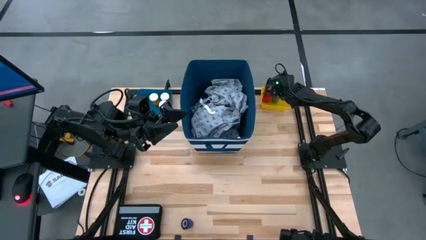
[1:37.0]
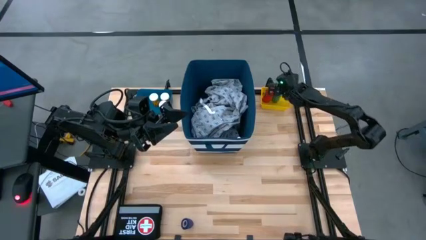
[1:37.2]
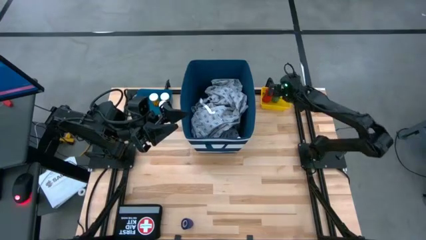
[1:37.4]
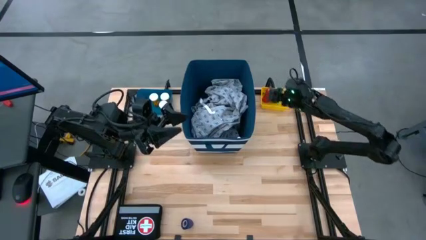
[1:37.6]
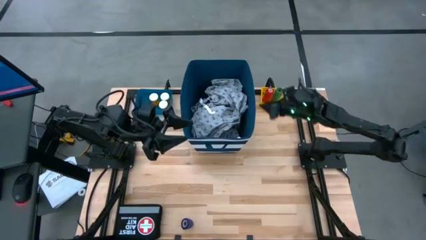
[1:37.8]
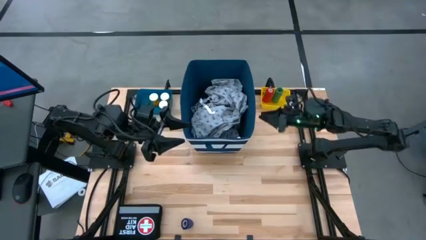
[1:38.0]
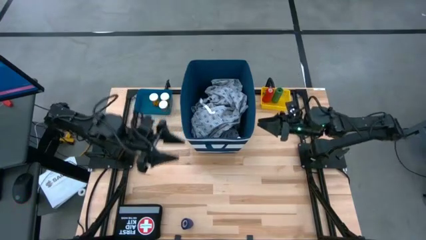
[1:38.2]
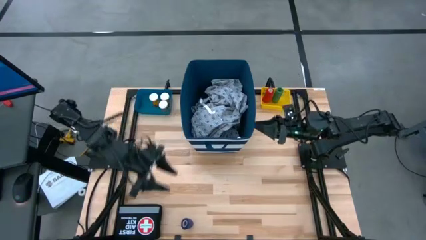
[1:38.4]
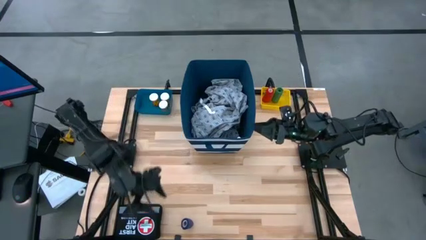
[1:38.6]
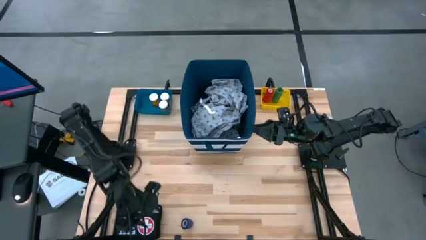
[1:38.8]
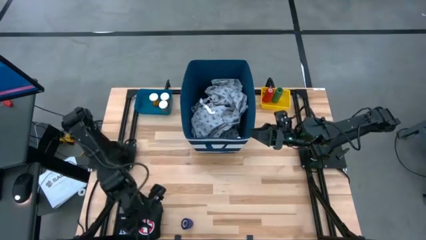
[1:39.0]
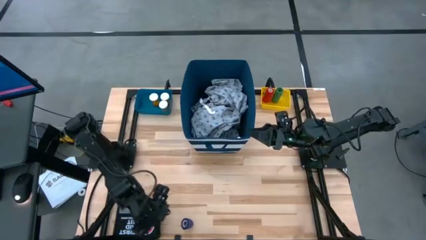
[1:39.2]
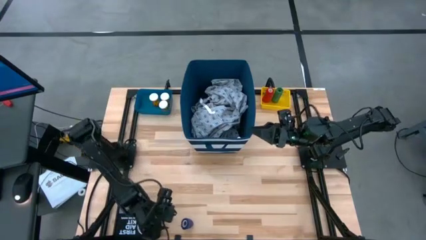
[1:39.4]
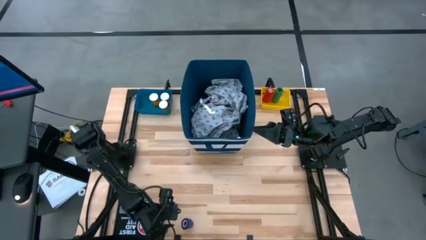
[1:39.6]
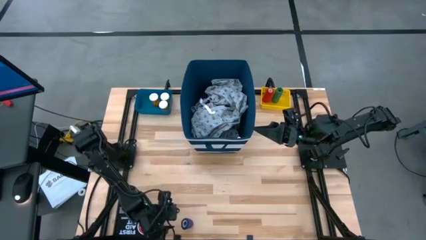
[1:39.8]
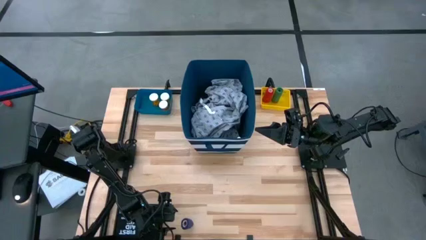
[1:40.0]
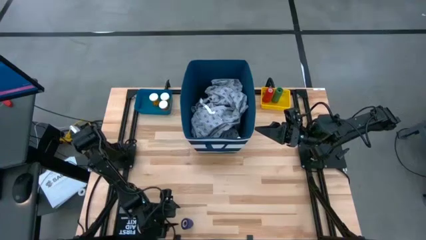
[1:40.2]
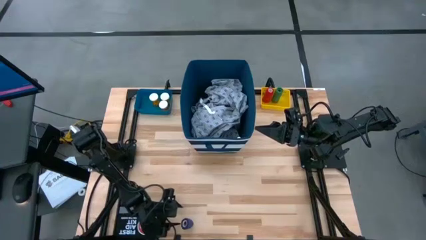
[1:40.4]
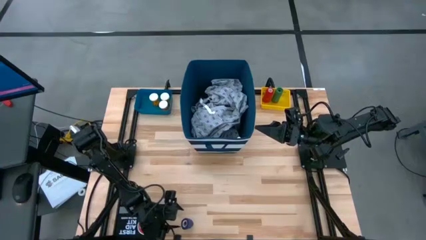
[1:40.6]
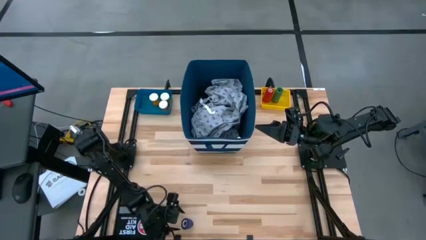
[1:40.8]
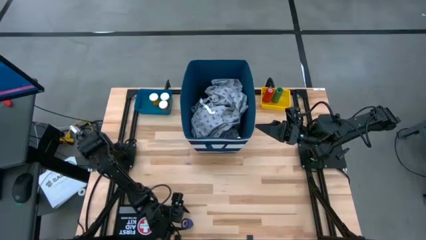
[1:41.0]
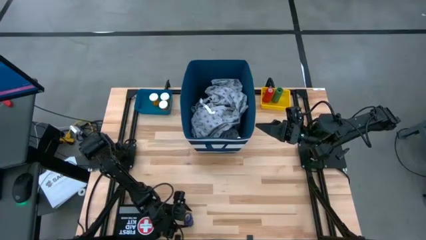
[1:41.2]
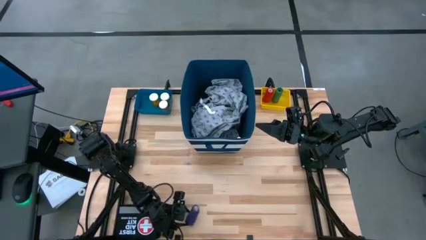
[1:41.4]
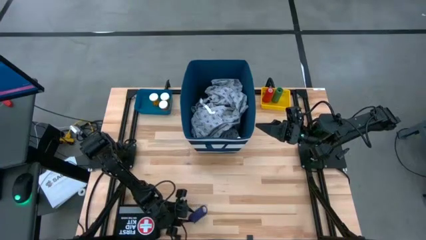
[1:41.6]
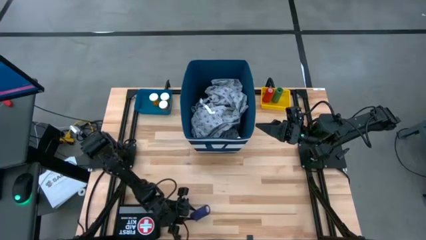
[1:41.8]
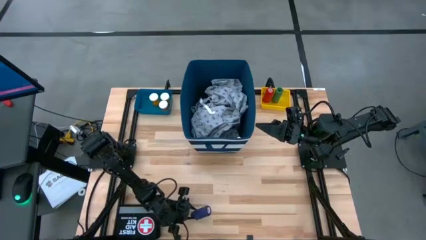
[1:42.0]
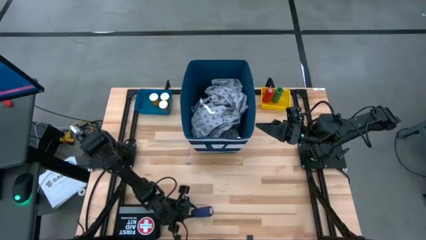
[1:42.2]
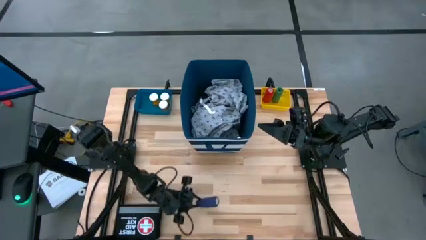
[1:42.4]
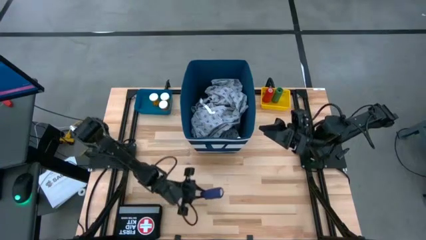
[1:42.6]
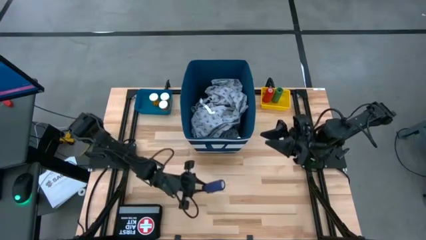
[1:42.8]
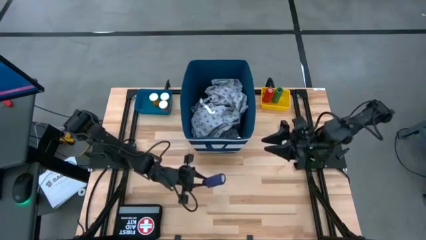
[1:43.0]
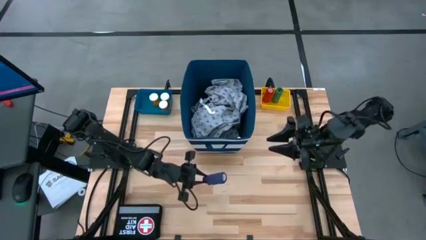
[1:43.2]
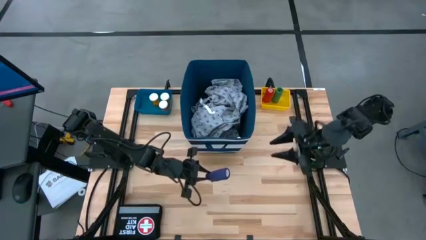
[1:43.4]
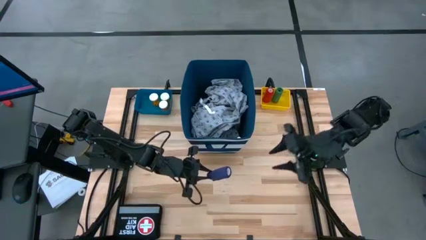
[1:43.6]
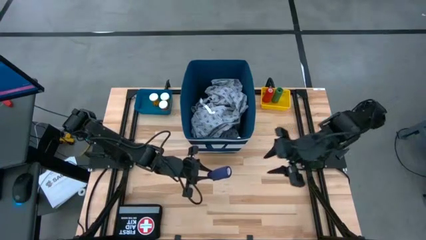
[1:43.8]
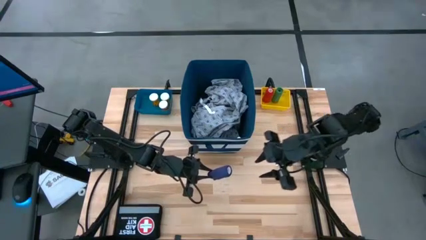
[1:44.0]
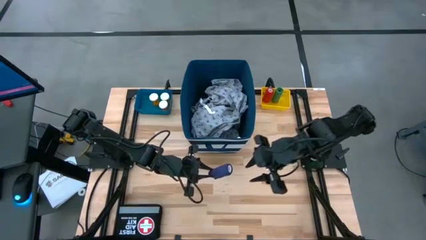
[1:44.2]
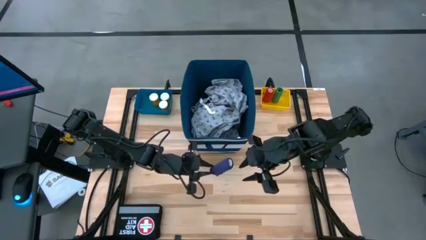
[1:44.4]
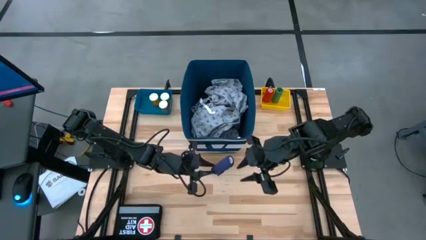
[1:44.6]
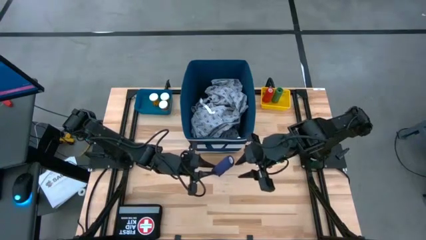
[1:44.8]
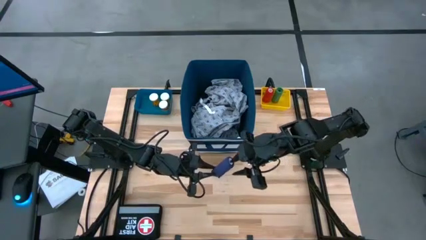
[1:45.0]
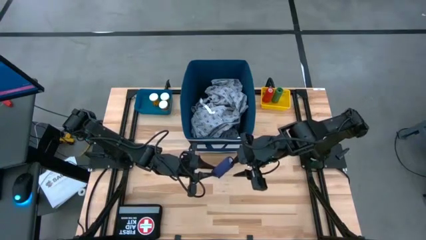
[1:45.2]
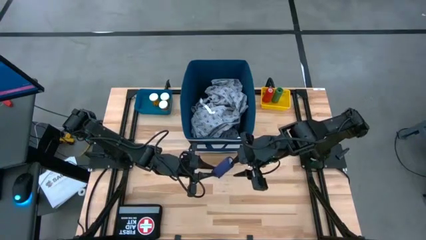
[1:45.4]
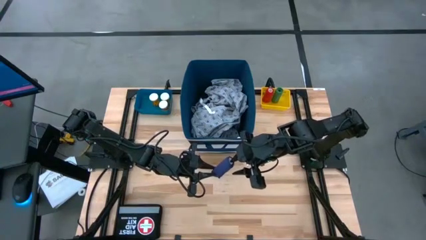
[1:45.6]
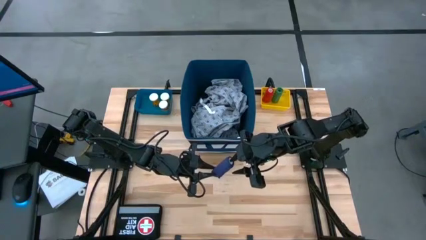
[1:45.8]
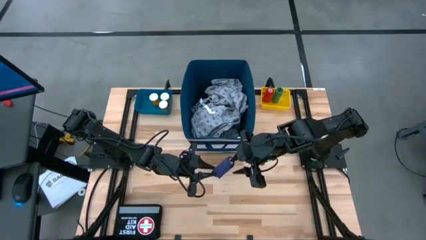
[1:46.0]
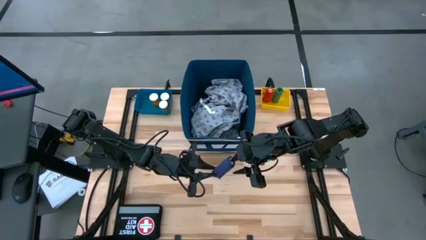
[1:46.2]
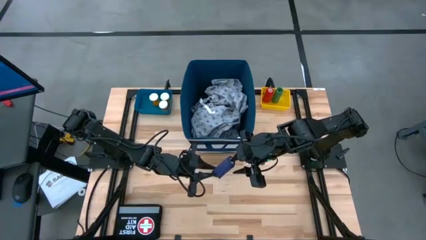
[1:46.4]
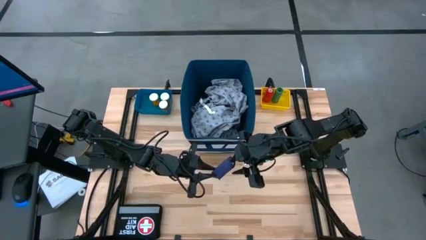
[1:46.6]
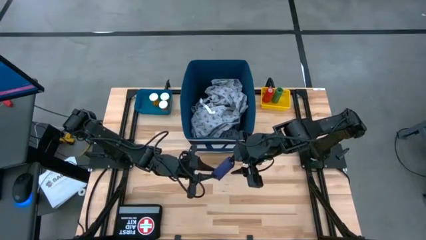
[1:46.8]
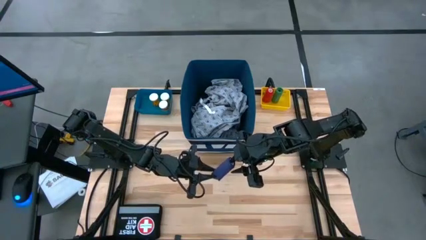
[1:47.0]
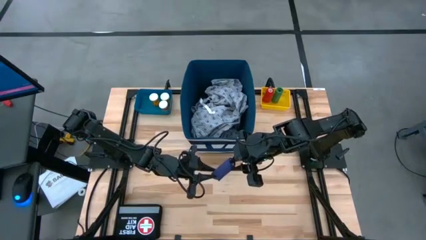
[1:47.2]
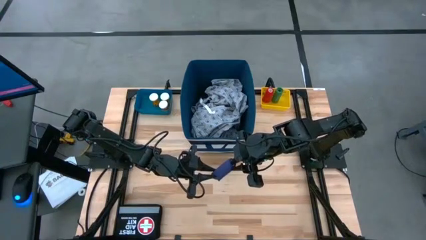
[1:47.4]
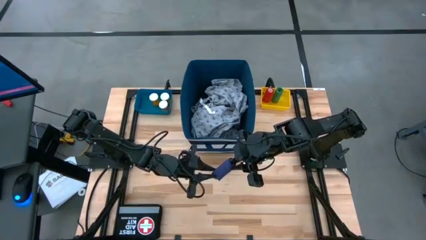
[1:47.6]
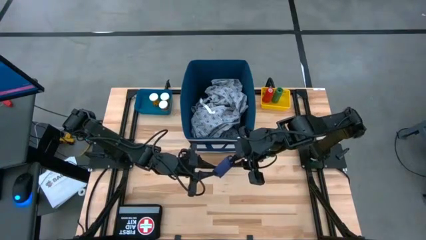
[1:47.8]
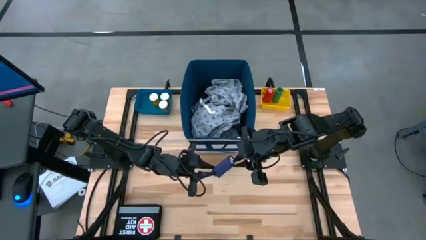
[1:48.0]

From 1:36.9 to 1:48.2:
Task: Pick & place medical supplies in basket/bin
Put the purple bandage into the yellow bin

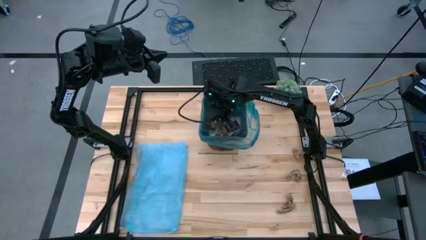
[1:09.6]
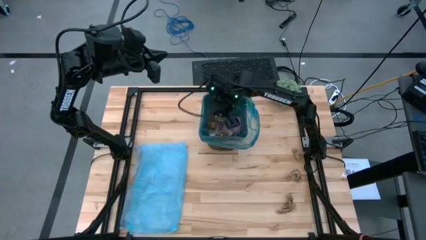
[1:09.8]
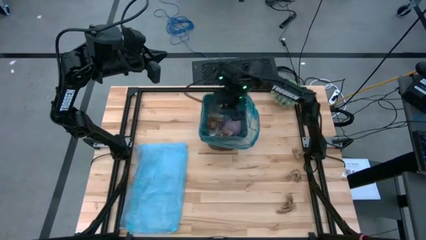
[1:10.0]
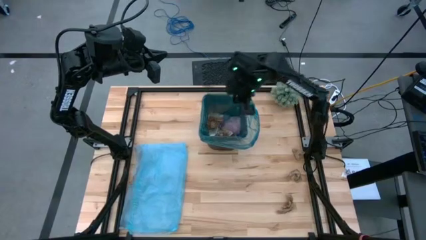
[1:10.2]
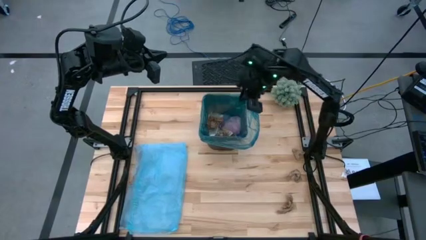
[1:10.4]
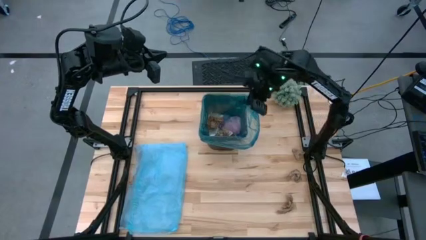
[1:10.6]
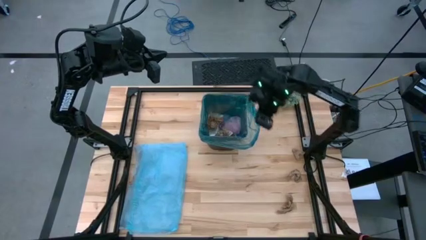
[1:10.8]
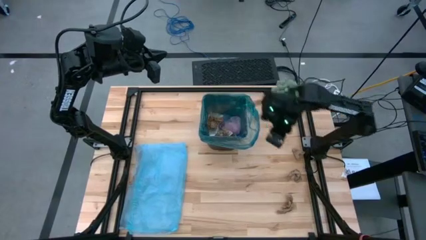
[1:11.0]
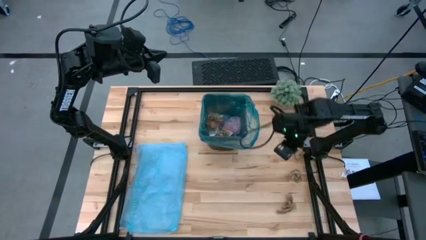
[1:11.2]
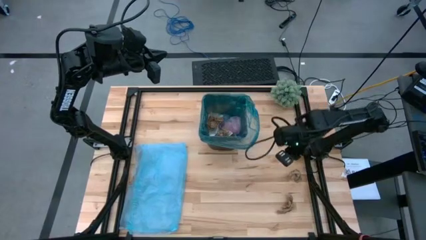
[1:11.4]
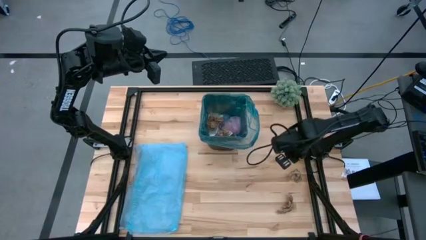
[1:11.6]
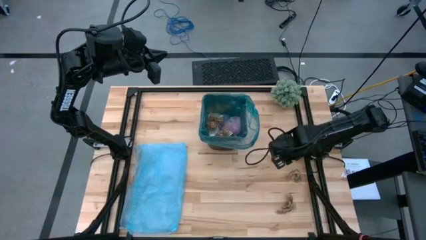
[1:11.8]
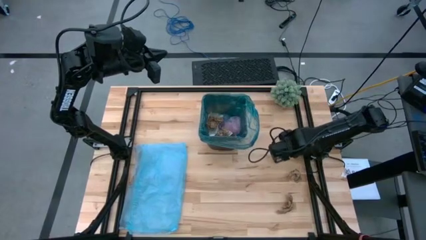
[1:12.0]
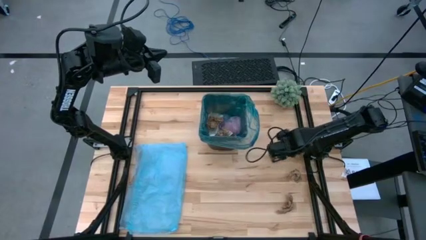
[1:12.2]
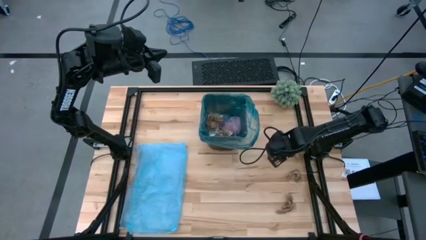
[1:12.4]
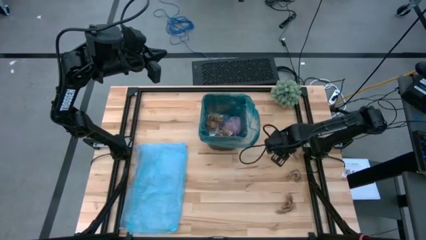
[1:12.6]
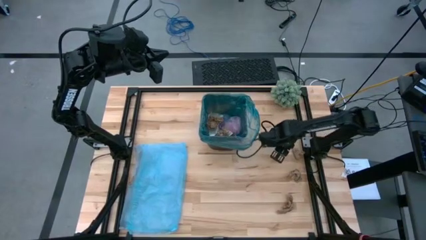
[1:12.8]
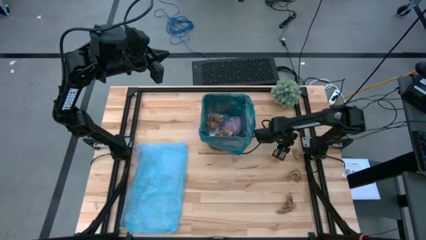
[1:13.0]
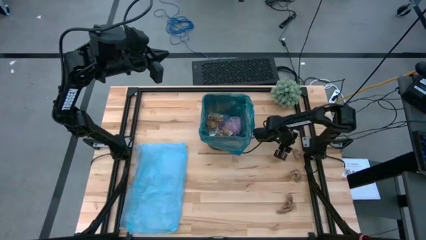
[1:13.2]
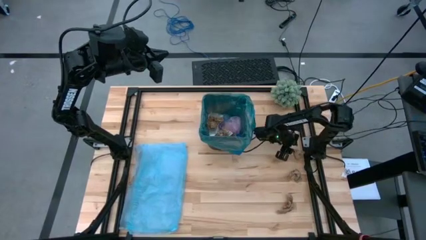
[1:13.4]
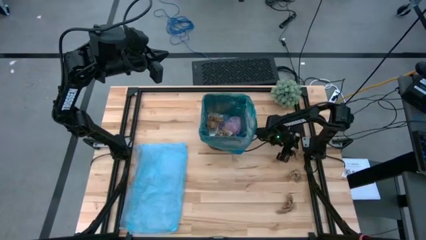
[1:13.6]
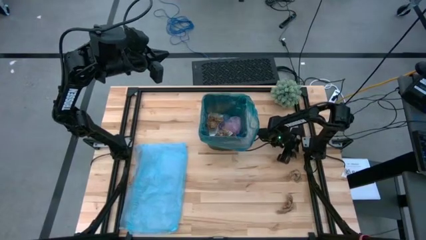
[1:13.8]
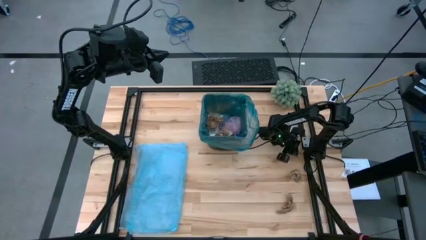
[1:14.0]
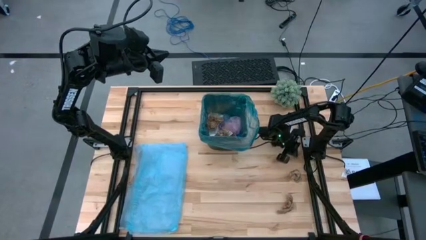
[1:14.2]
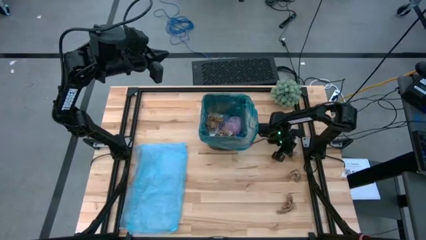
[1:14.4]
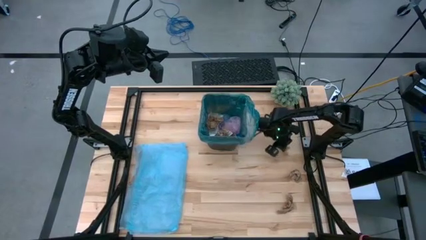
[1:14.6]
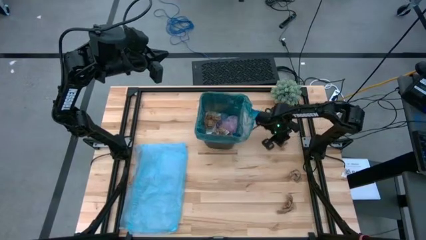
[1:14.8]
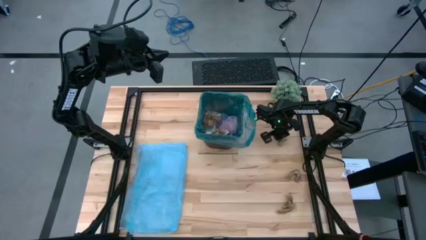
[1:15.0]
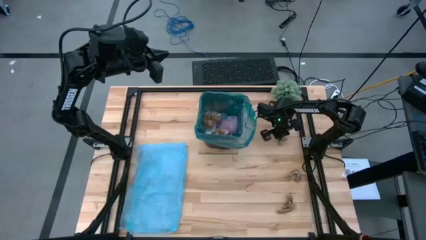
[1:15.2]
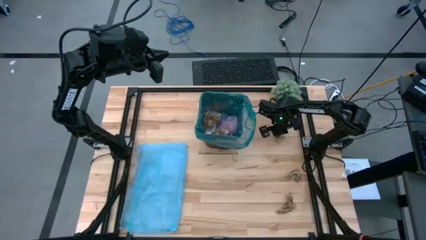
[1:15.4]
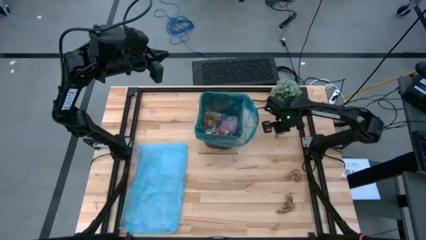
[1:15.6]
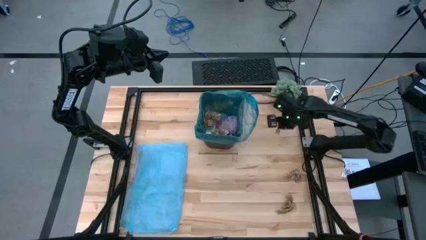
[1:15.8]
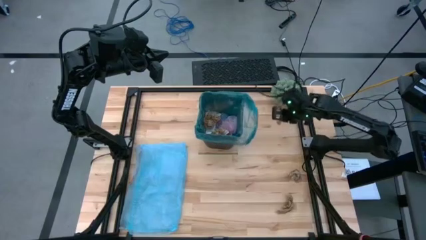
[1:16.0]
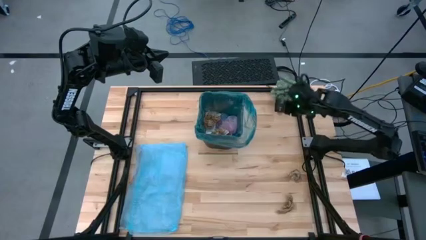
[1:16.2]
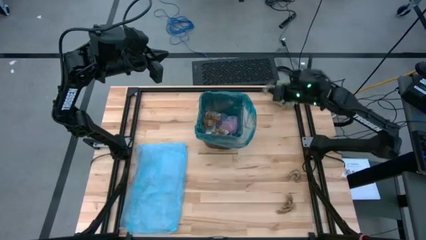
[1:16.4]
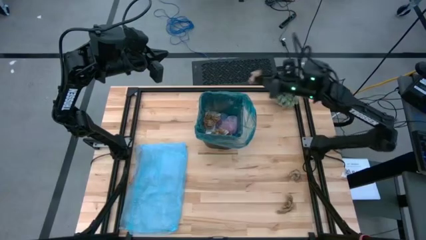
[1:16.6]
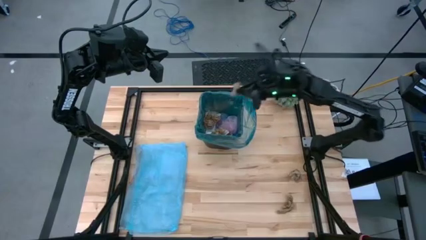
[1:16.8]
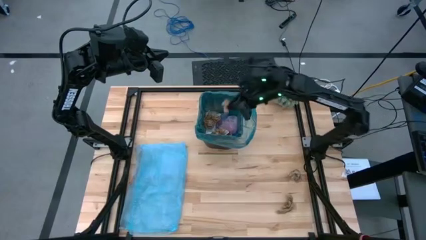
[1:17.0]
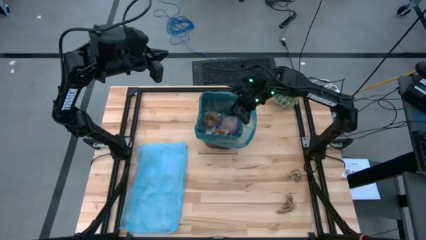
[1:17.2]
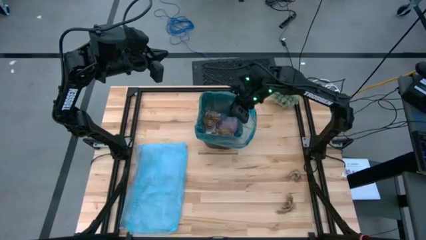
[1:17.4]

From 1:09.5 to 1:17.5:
Task: place trash/remove bag and relplace
Put the brown napkin into the trash bin
